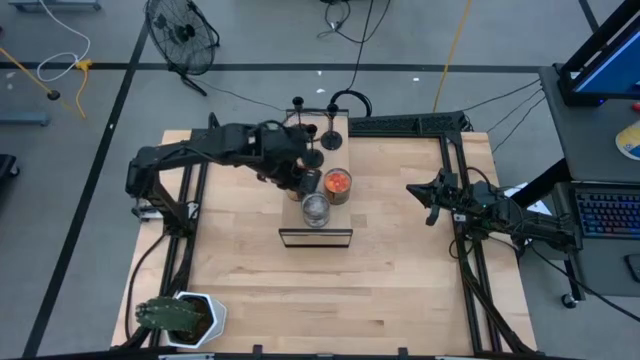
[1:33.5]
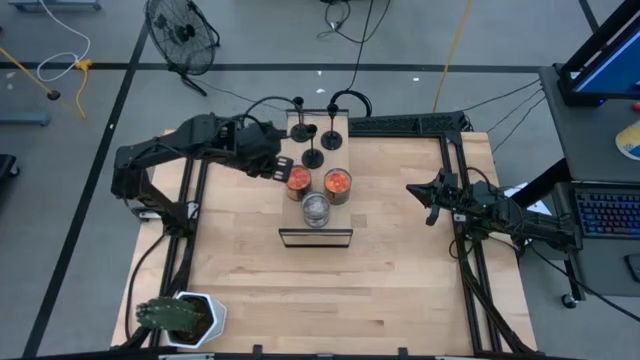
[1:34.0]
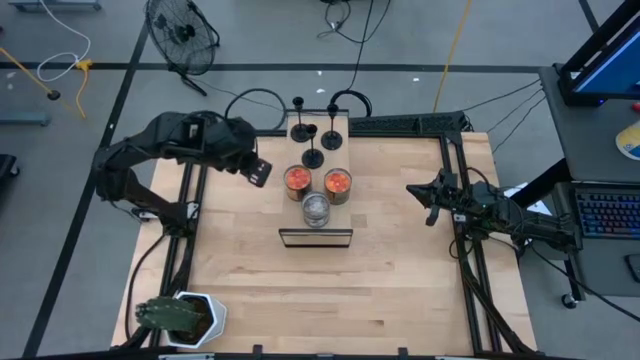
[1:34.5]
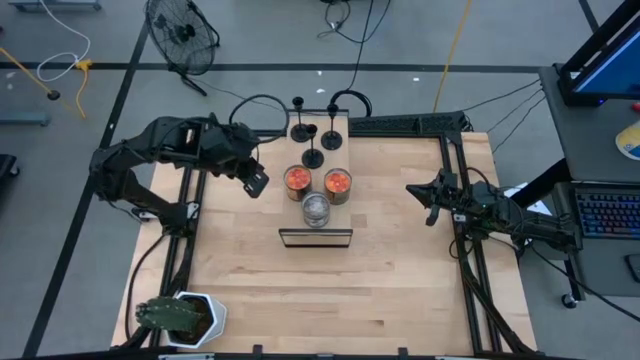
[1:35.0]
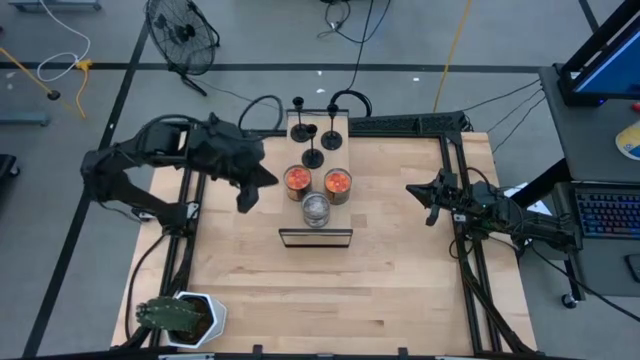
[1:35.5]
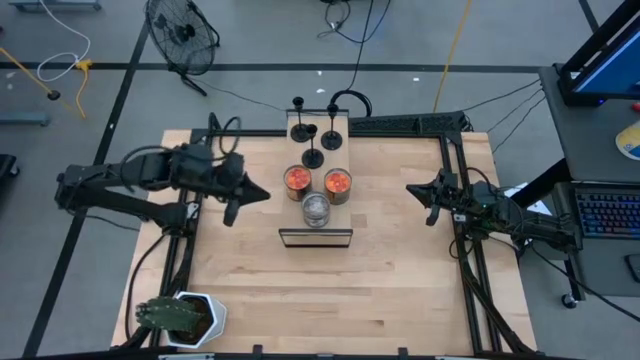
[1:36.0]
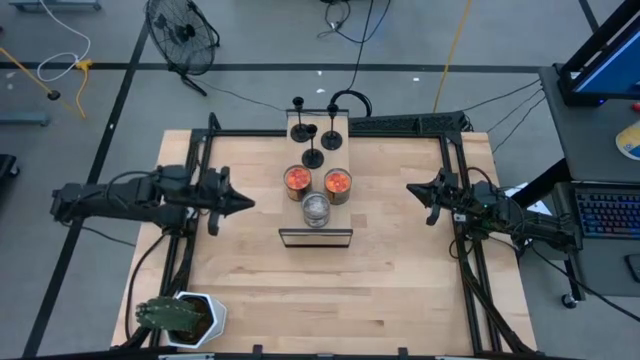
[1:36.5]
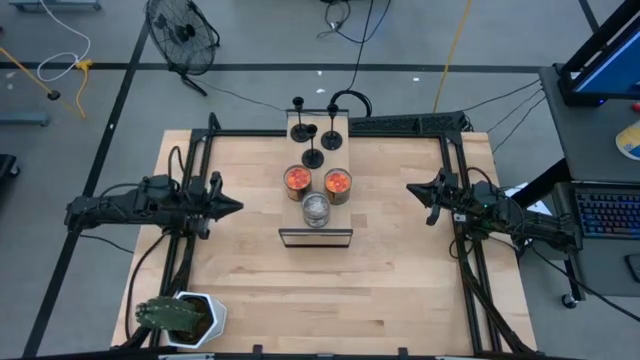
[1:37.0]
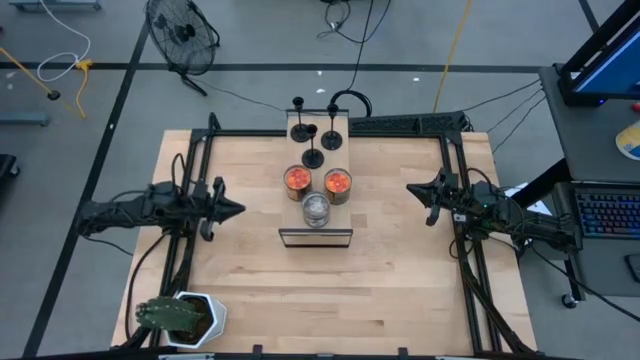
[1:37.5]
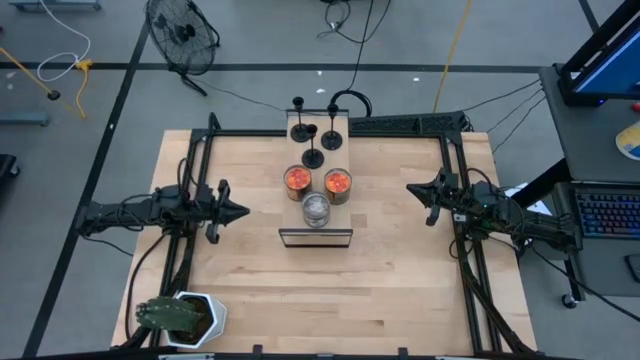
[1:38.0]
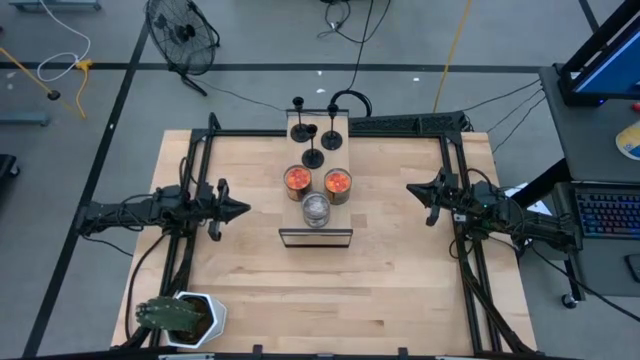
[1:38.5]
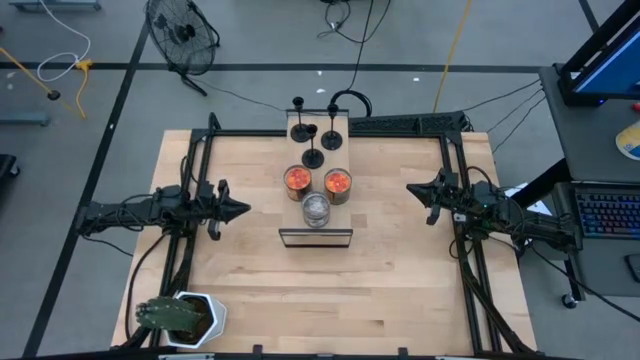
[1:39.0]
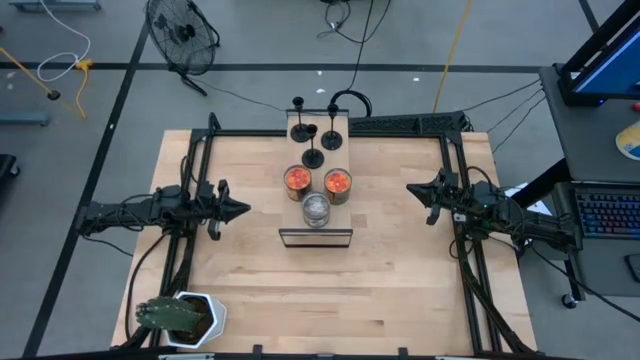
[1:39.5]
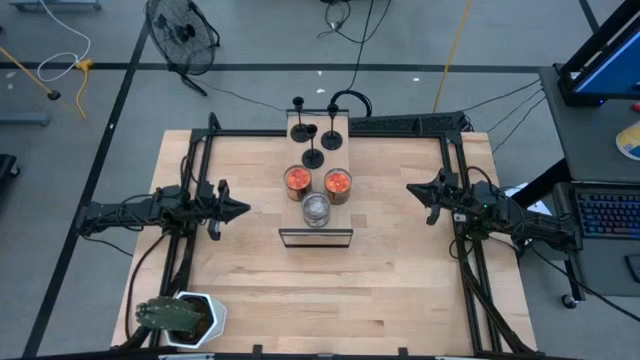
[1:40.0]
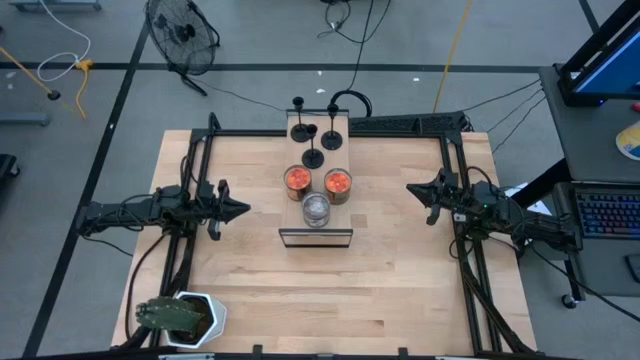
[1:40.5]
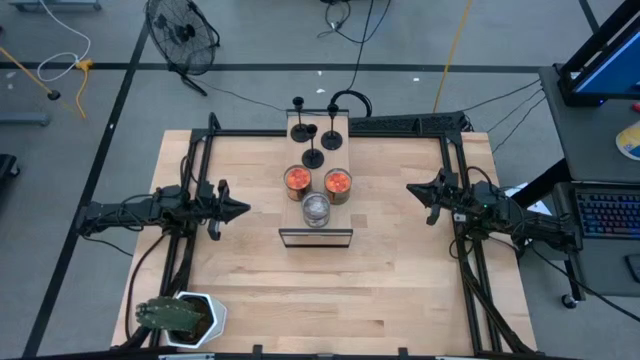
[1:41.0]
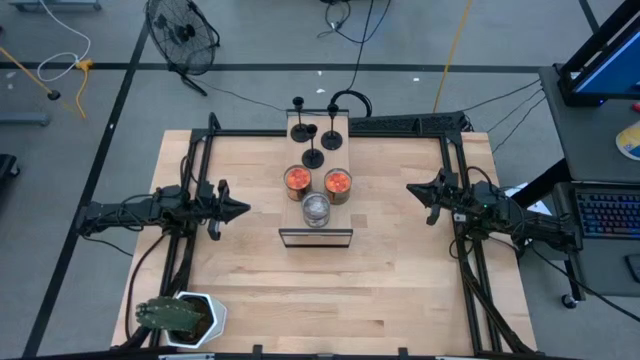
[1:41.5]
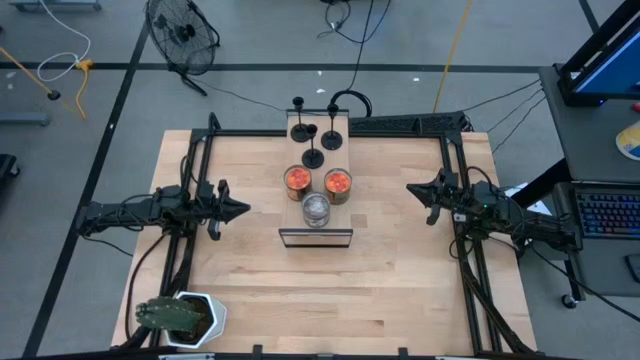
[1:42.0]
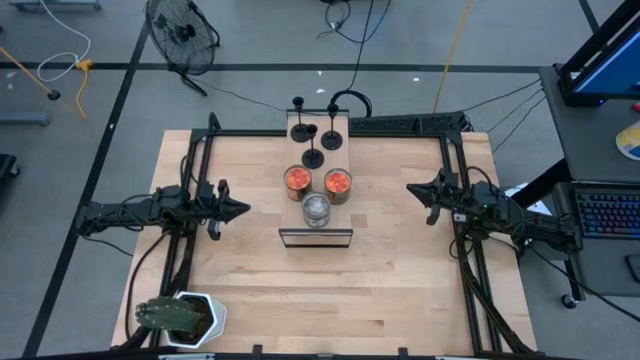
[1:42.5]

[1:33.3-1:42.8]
Task: Pick & Place candle stick holders
Return to Home Position

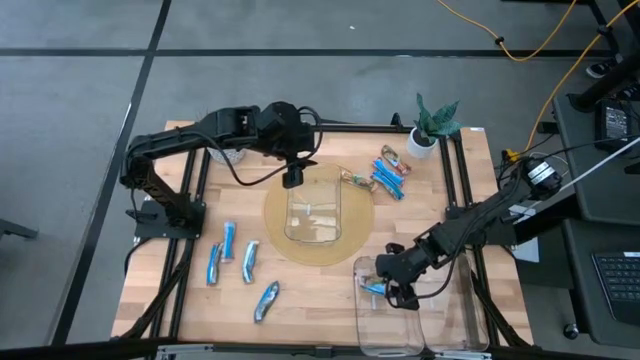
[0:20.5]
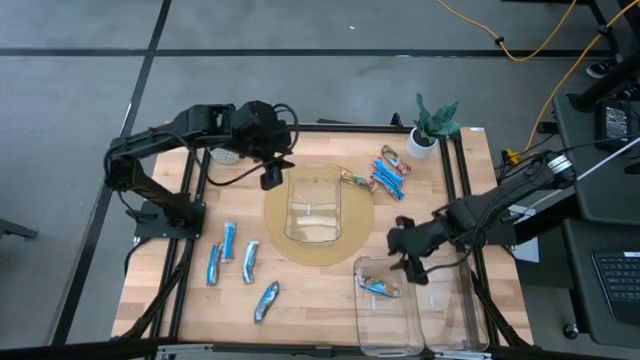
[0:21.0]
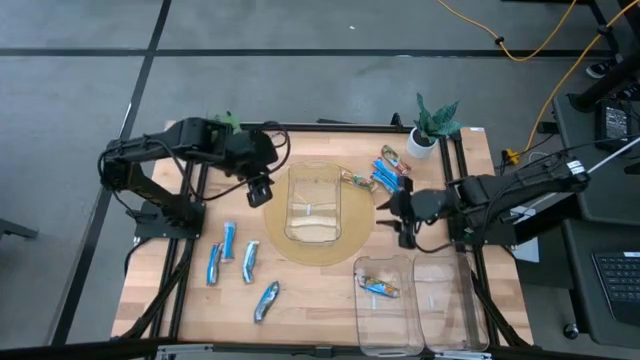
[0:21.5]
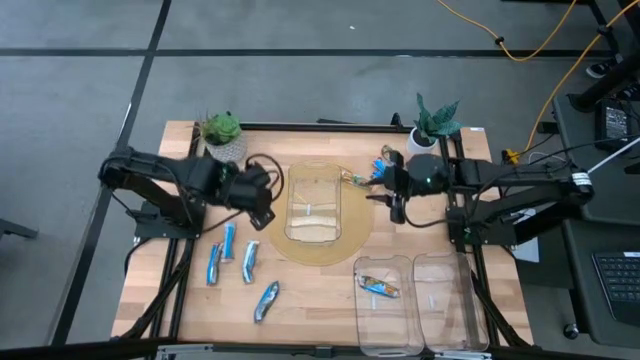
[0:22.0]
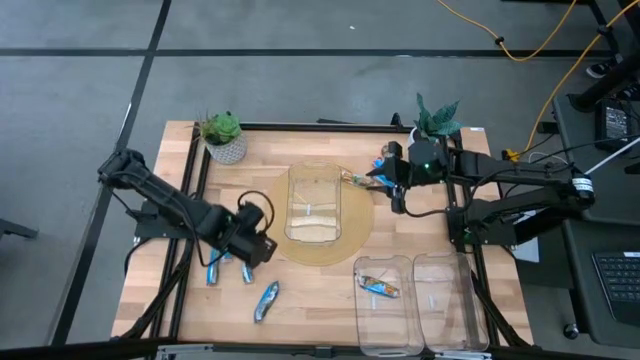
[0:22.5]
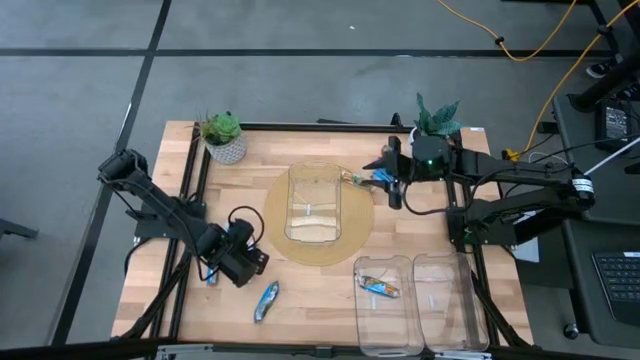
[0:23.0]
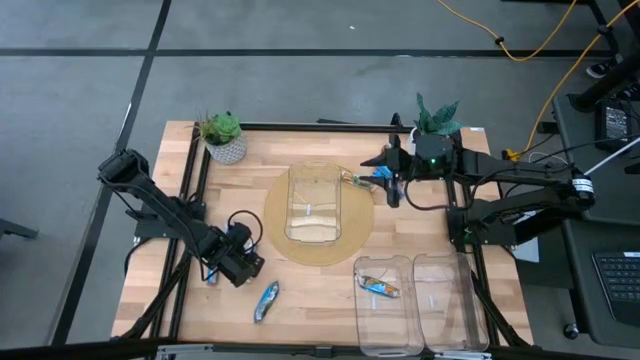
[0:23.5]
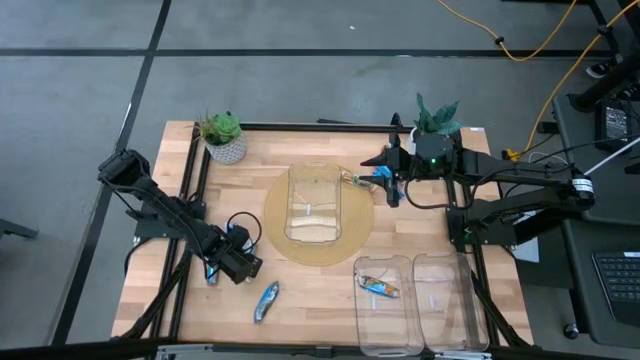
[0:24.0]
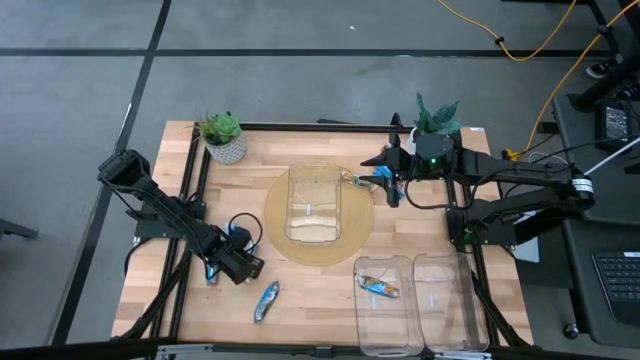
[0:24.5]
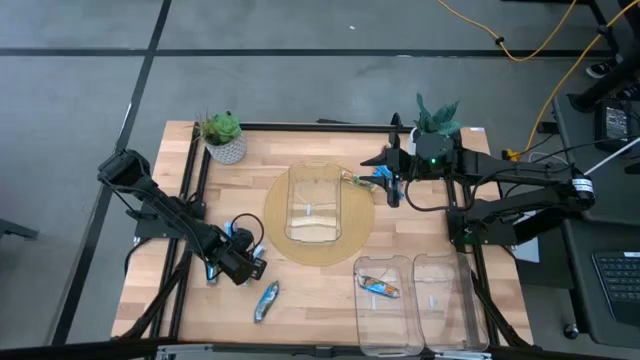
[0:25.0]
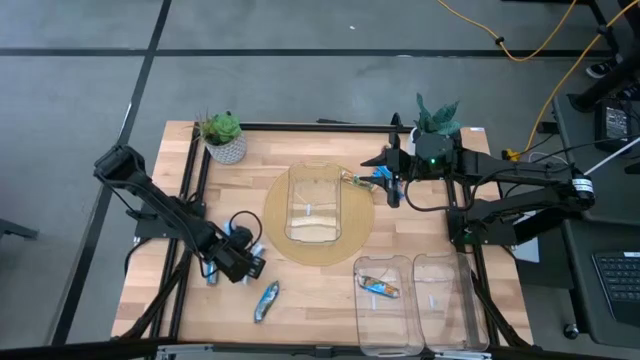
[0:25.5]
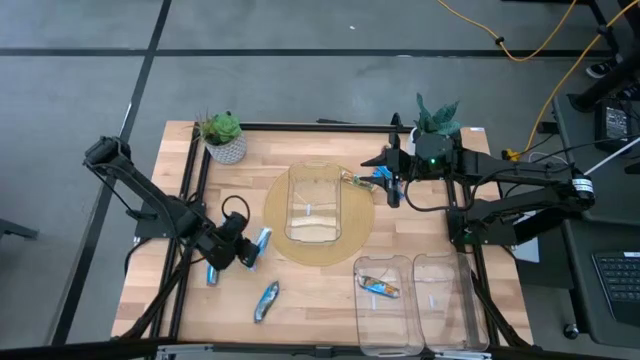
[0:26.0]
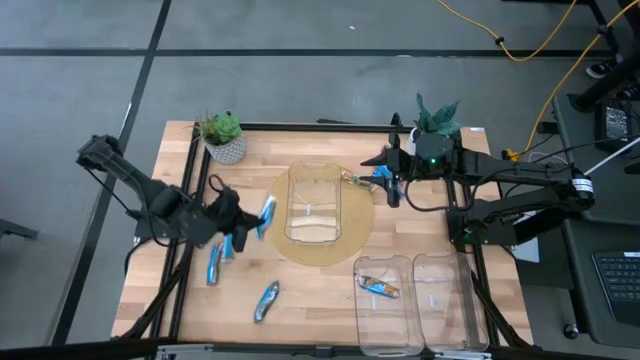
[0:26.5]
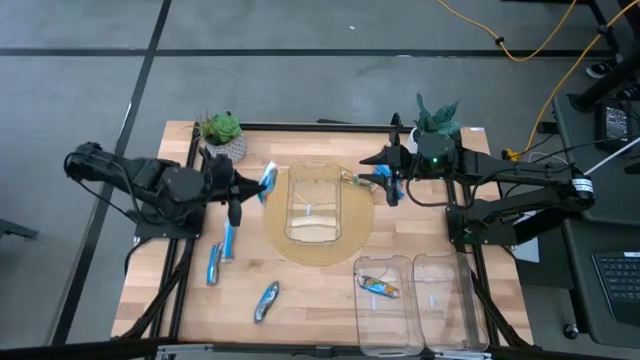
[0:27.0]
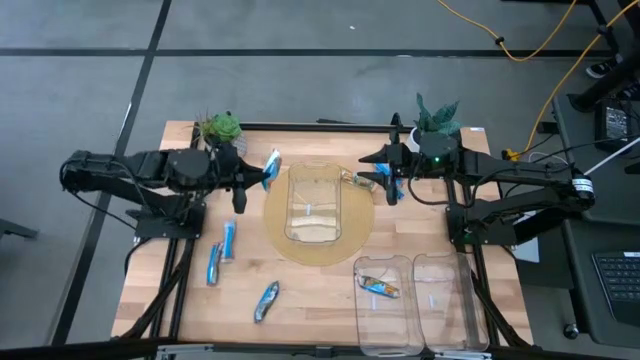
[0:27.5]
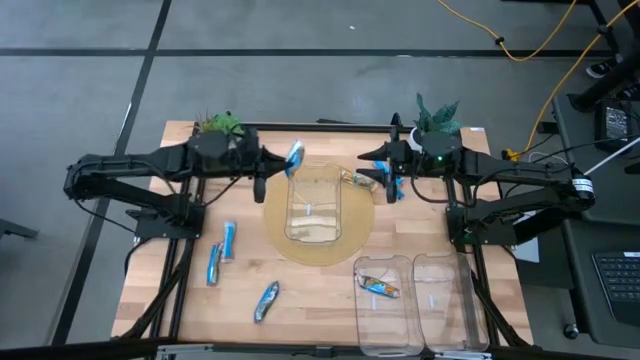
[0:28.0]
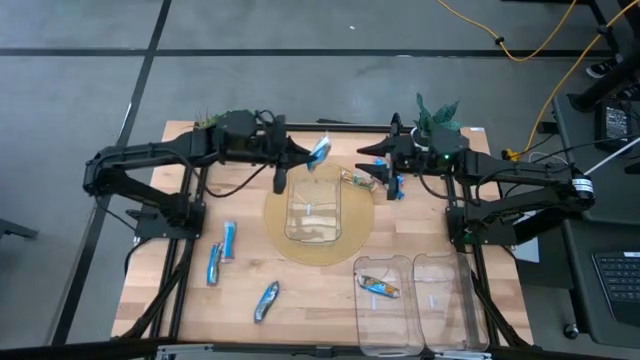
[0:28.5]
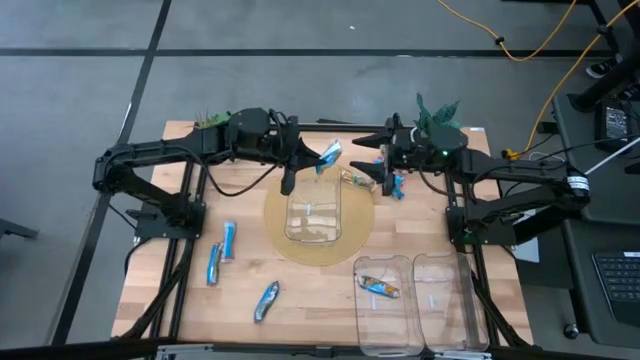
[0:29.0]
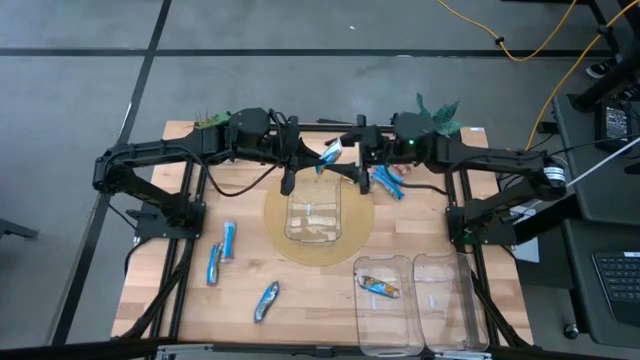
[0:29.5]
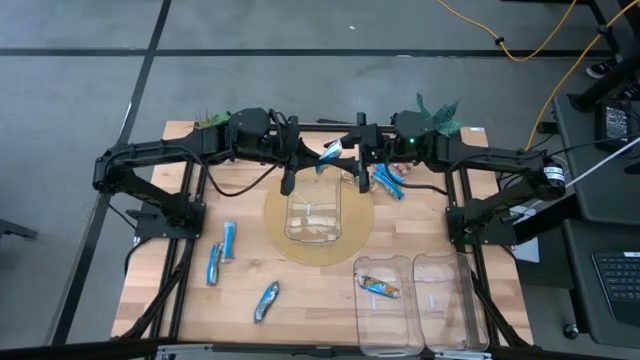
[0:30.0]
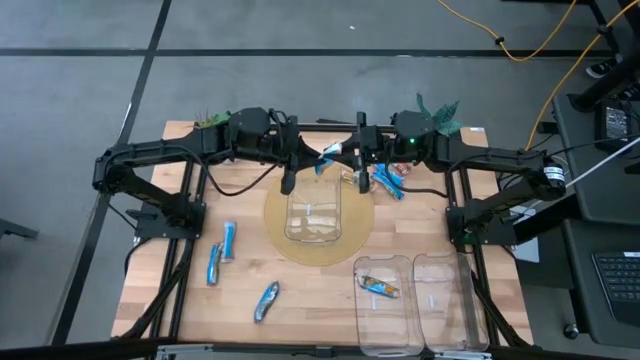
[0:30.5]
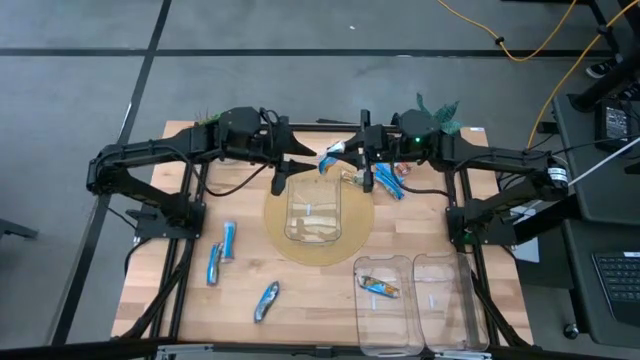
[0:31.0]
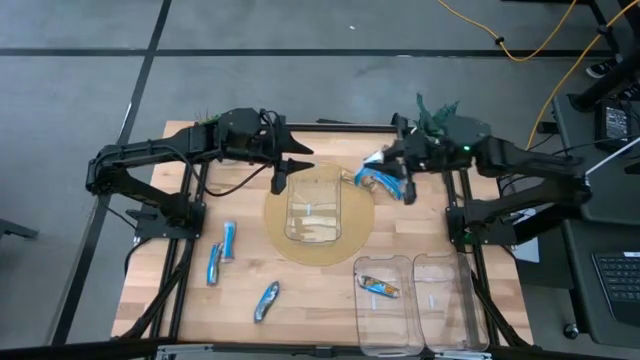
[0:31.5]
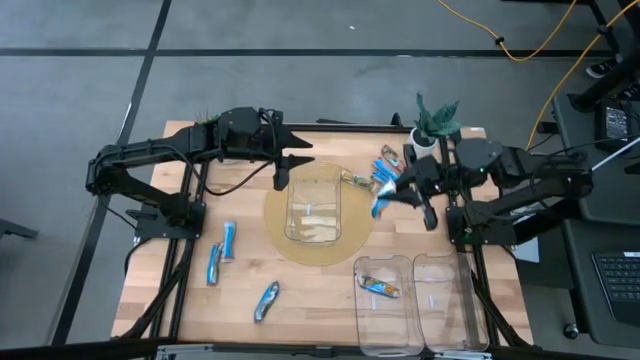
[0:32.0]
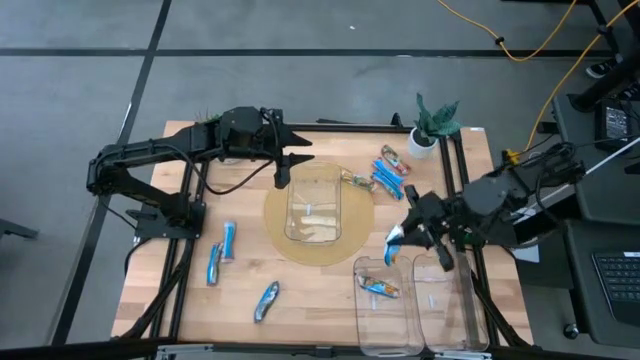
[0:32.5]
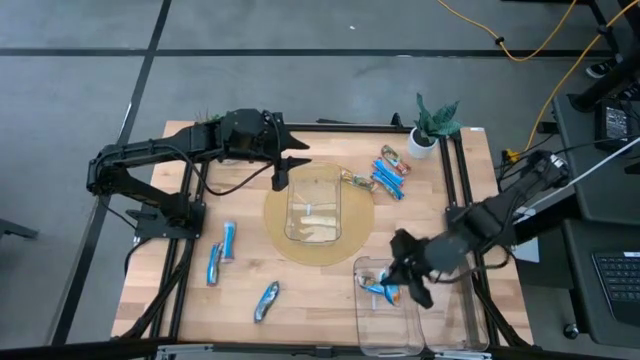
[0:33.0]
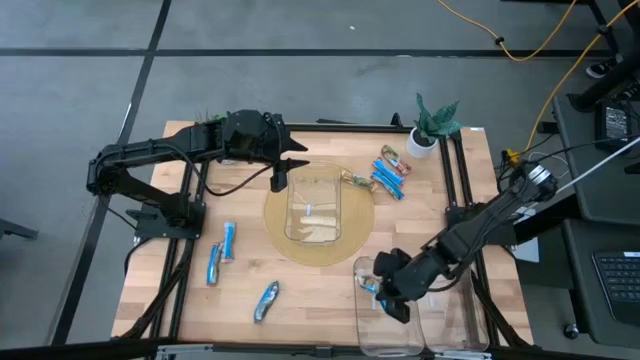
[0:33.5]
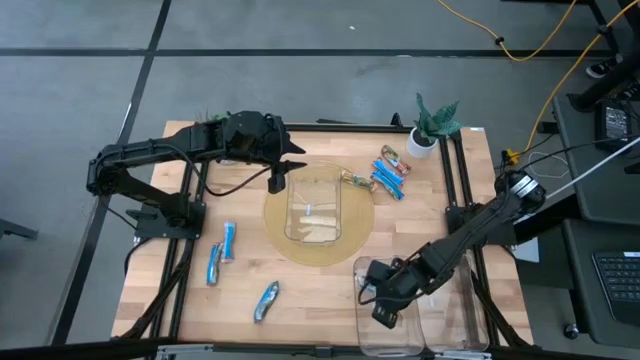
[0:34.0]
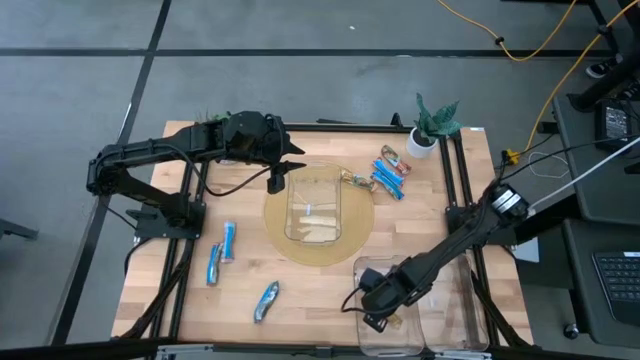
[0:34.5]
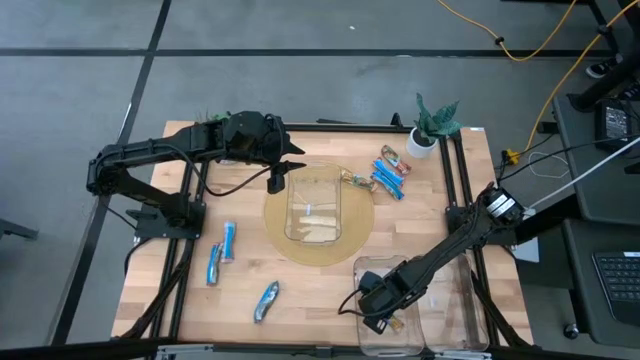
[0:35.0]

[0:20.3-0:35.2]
Task: Pick and place Granola Bars by type
Put the yellow granola bar pack into the bottom left transparent bin
